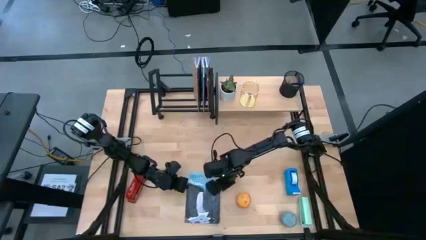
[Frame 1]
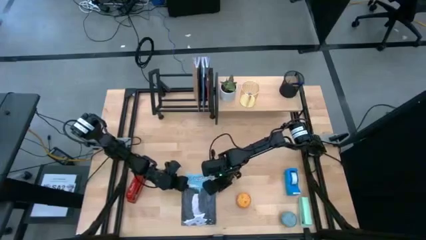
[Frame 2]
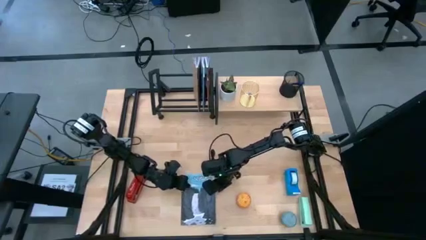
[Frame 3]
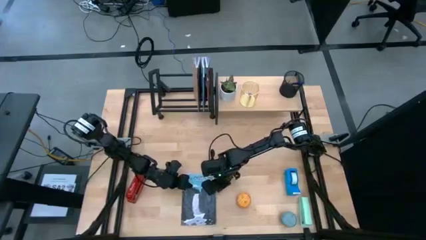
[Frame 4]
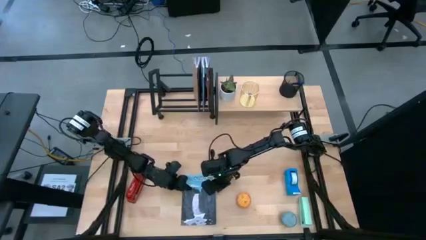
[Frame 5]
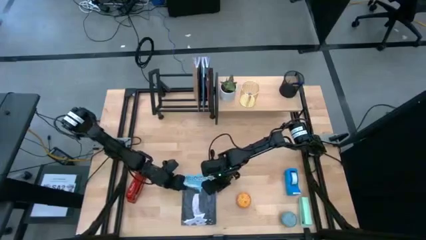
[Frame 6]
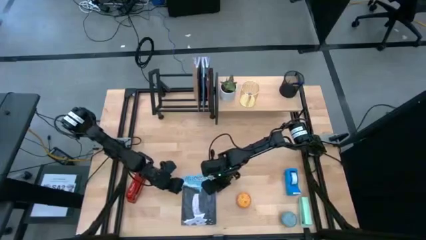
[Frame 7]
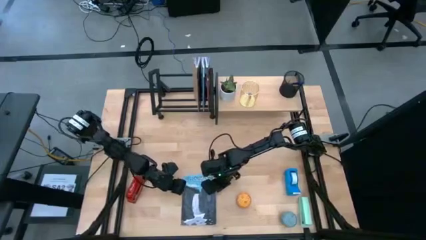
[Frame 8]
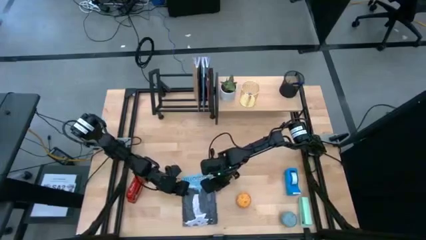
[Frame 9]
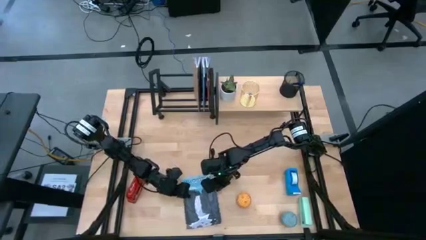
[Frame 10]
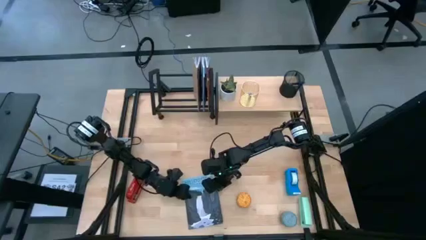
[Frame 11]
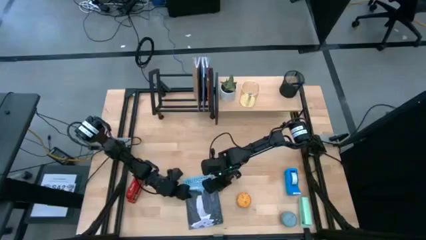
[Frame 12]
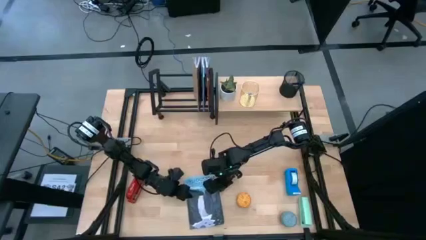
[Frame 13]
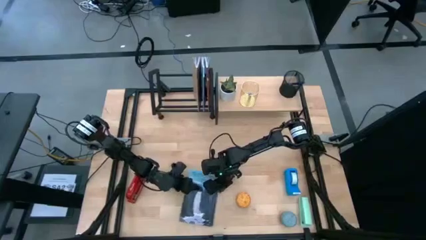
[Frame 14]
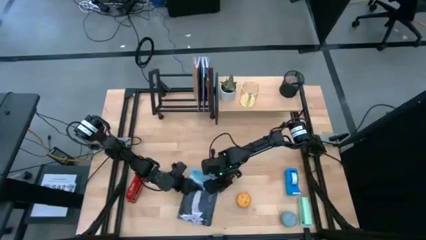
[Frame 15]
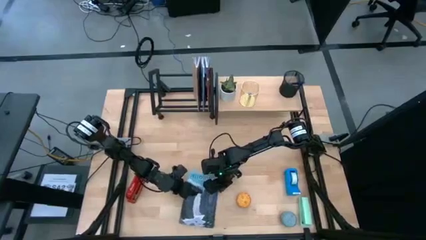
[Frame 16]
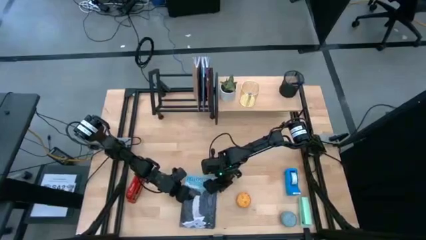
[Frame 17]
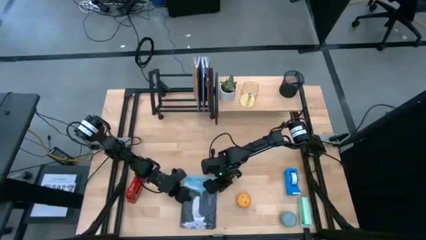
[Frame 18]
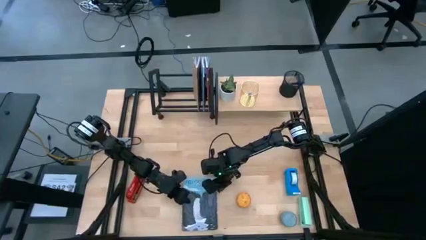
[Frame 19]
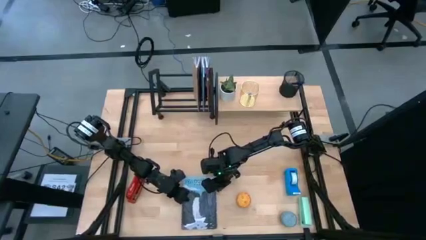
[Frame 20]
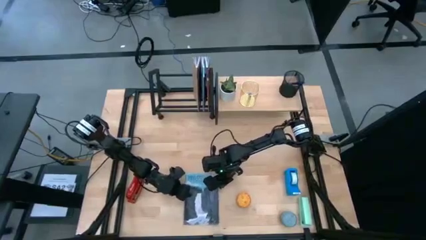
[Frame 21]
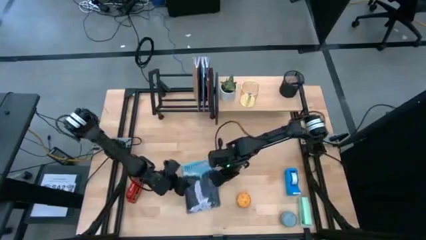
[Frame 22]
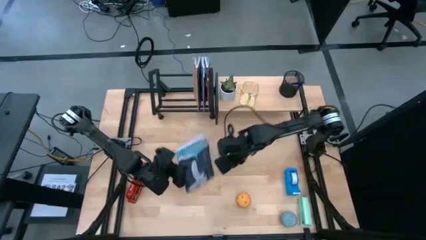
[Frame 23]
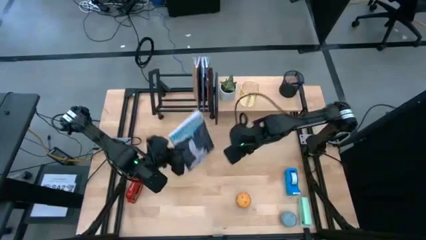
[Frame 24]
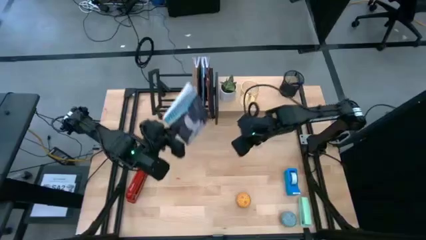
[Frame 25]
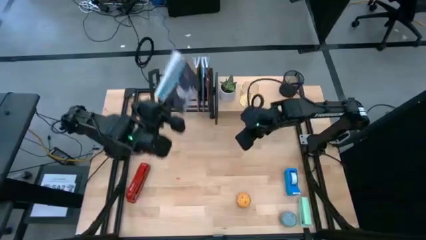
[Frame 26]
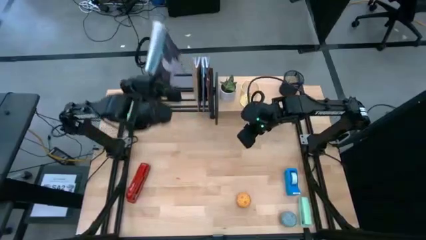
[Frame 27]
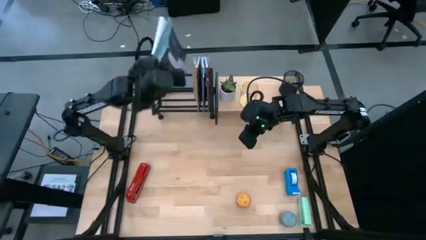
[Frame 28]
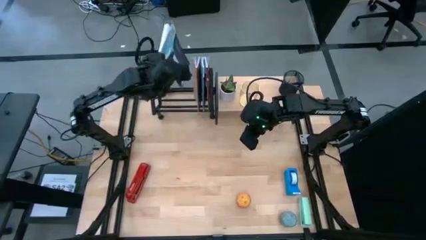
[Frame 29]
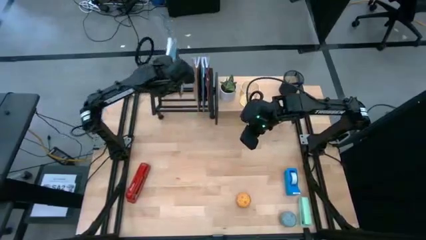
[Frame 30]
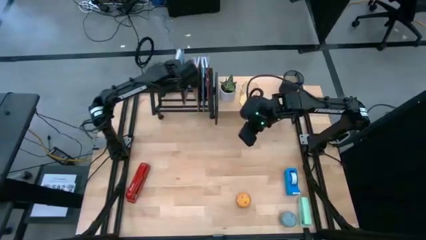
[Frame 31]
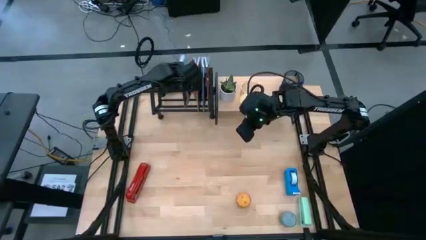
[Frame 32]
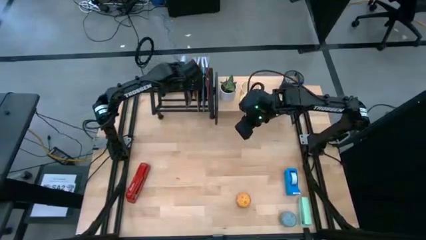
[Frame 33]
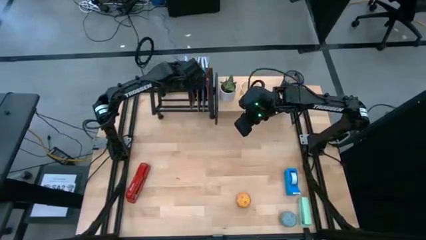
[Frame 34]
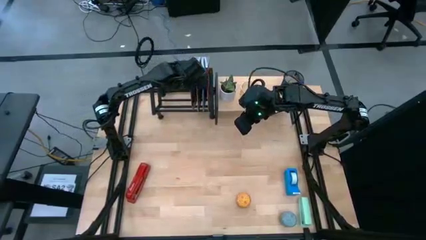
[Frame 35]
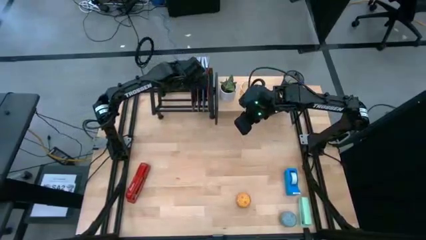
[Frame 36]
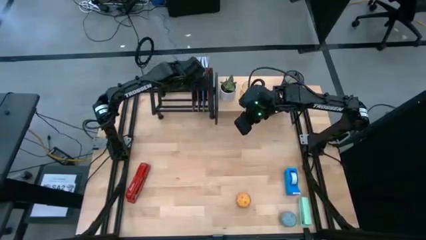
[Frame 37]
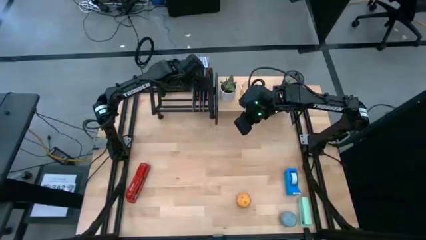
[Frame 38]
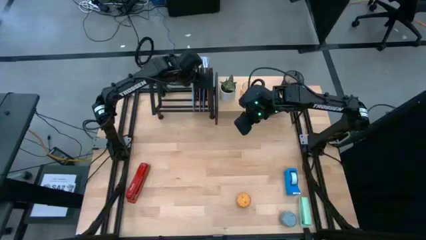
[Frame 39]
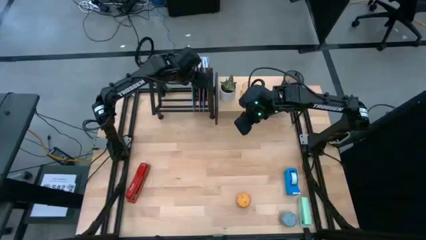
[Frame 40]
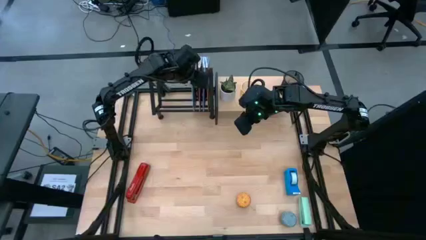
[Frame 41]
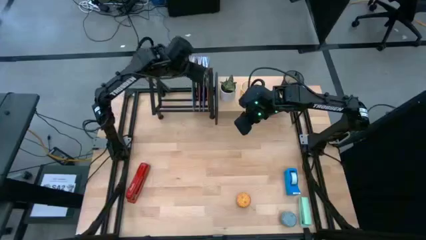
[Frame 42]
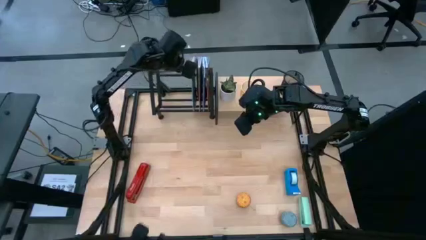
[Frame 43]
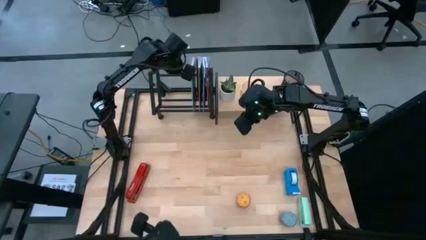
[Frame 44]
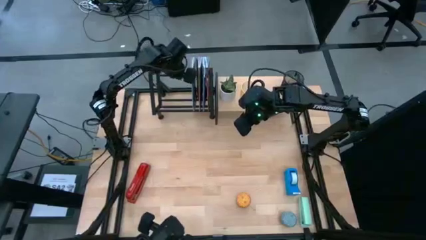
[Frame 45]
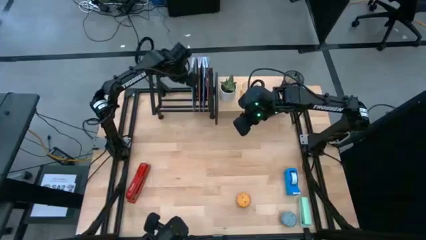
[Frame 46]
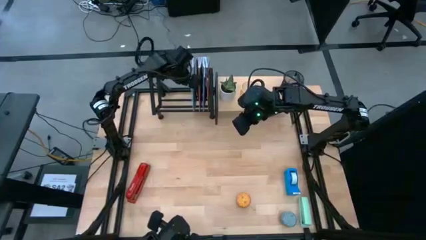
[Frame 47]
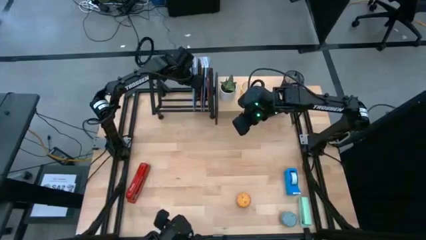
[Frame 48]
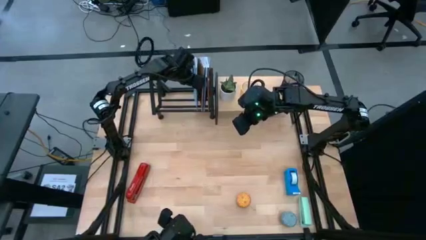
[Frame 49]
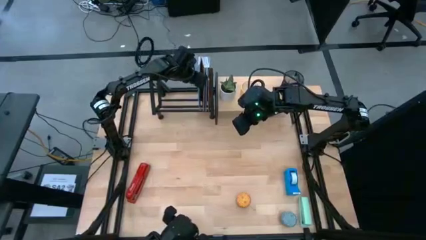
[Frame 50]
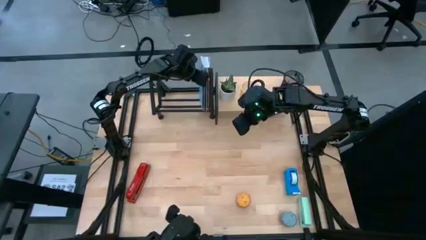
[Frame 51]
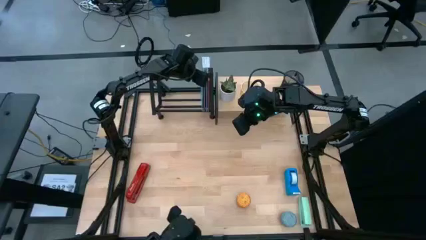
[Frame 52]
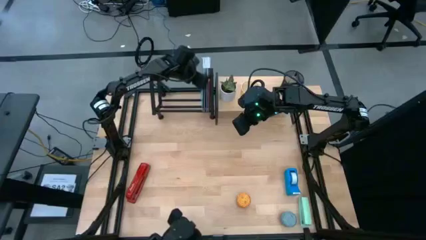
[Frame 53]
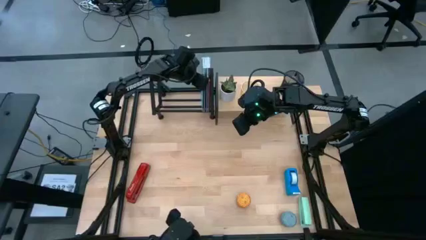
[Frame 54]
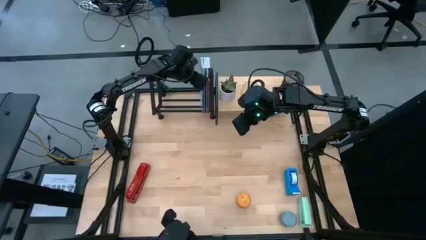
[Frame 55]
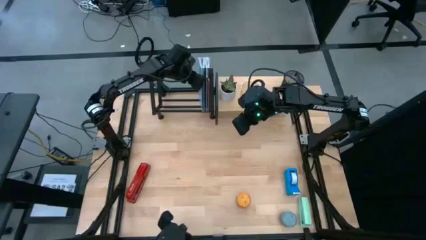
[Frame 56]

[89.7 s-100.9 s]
Task: Stock shelves
Put the blue book on the black book shelf

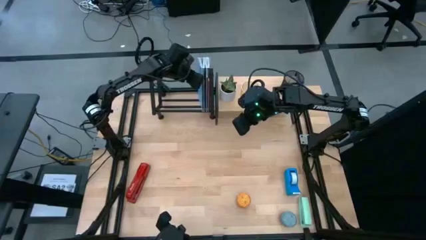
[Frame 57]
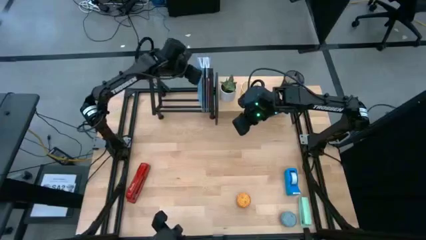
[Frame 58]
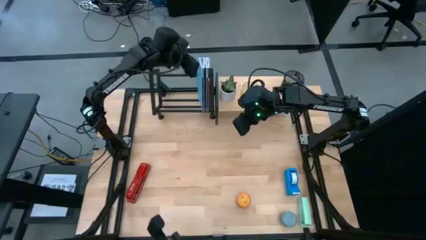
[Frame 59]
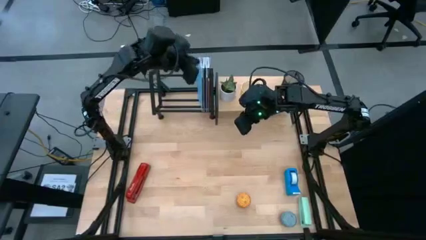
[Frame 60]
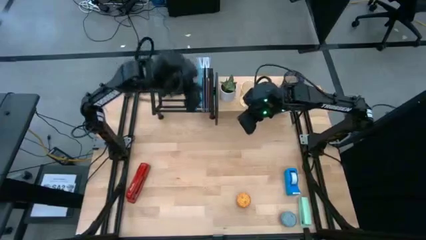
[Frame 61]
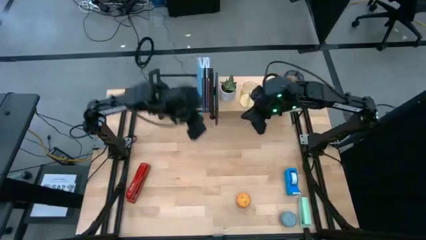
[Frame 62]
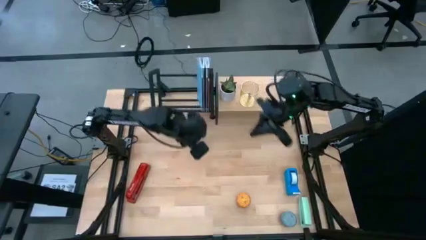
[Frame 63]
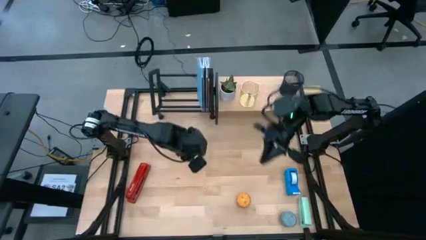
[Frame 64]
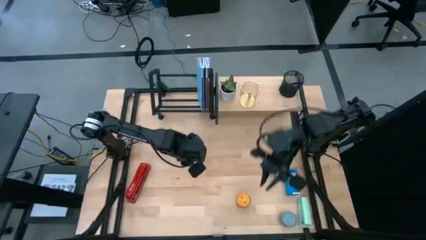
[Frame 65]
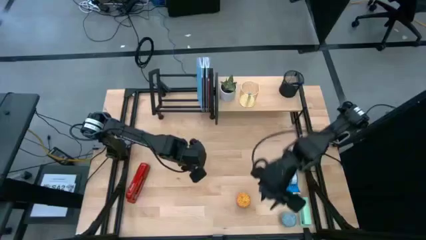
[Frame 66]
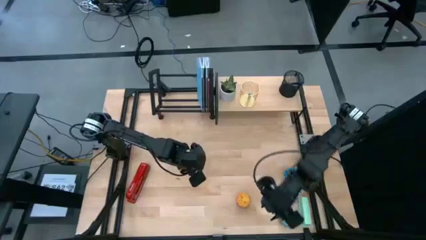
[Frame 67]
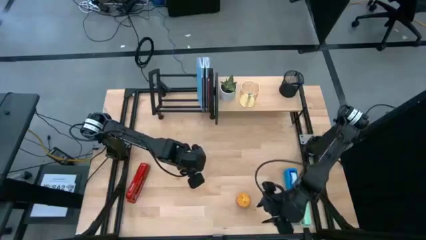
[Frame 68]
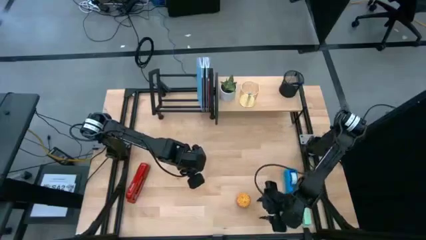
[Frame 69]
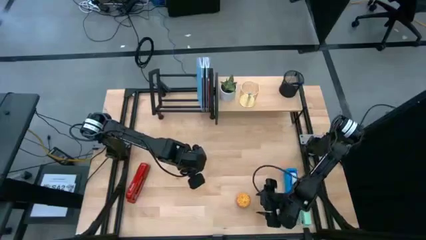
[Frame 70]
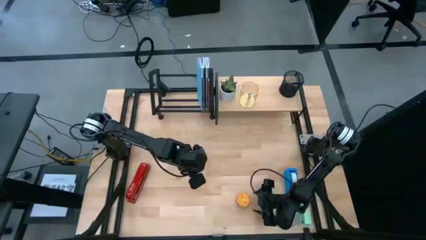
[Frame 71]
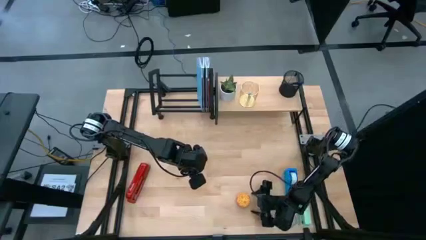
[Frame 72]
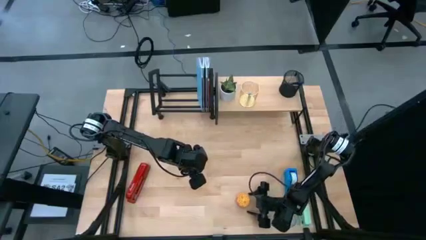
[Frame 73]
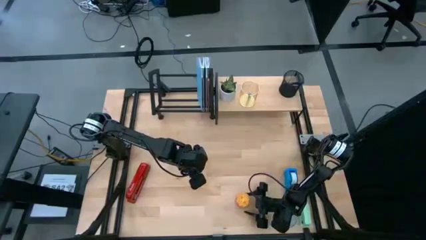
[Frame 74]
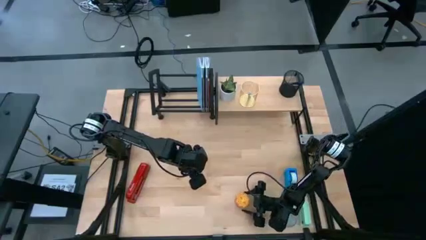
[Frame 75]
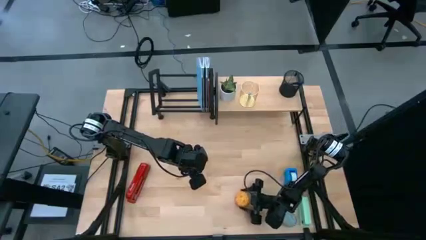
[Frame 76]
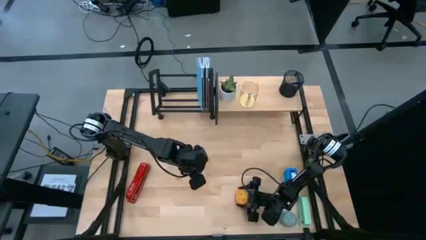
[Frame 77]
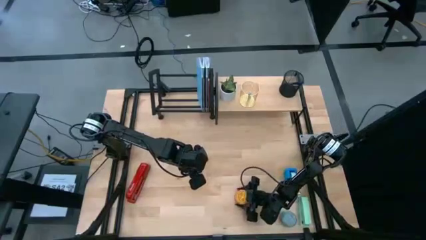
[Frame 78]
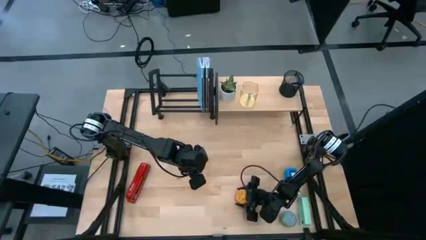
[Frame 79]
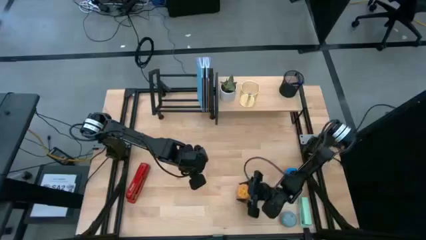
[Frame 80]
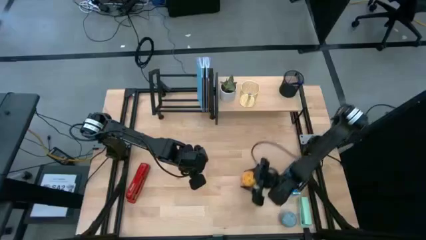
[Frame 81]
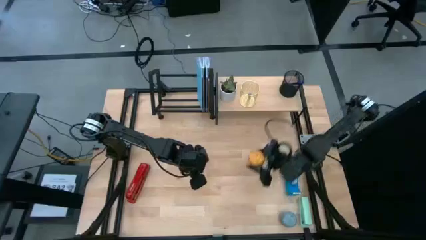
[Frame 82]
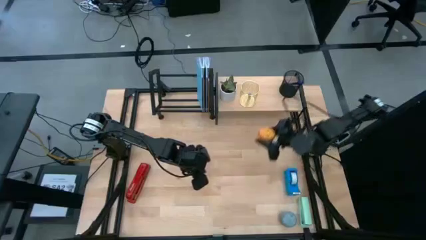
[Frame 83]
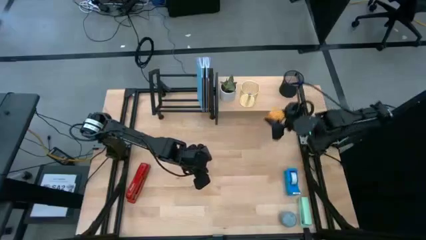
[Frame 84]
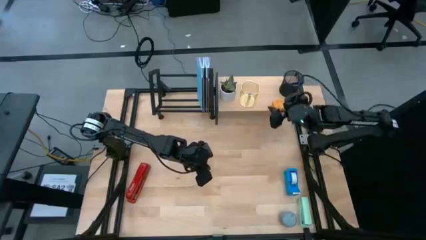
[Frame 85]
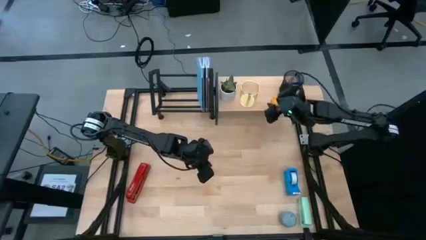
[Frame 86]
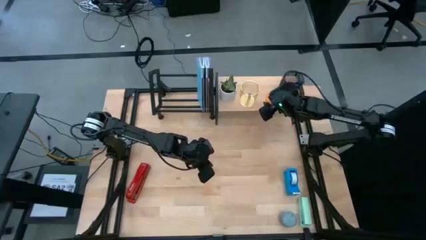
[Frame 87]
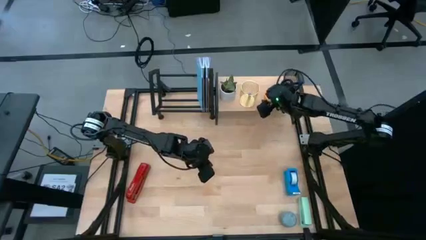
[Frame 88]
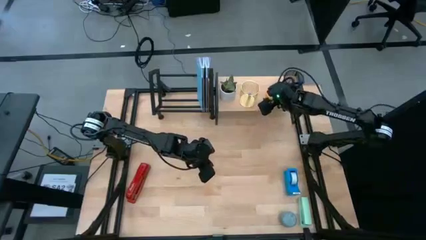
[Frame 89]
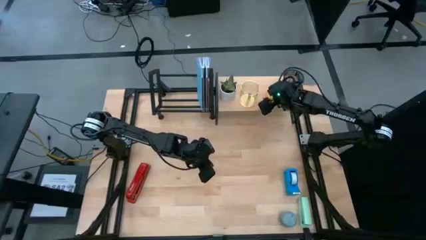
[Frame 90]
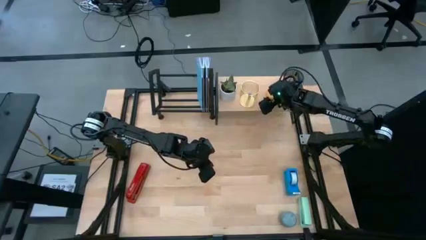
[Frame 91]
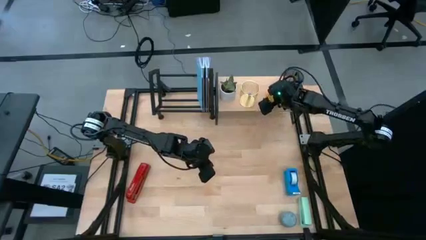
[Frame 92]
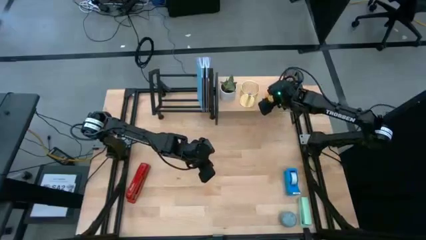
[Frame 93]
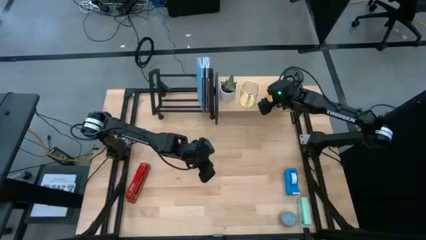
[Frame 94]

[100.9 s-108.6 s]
Put the yellow scented candle on the shelf
